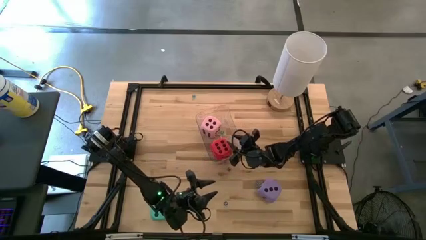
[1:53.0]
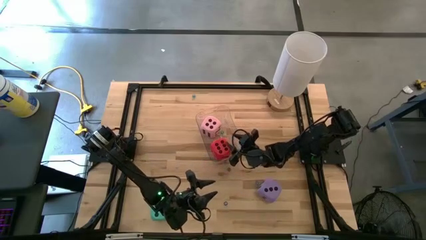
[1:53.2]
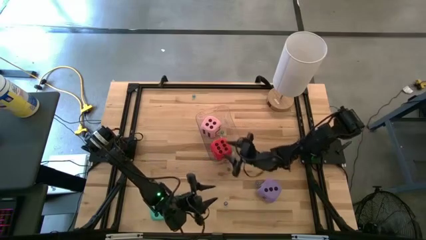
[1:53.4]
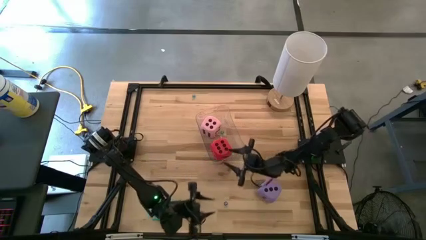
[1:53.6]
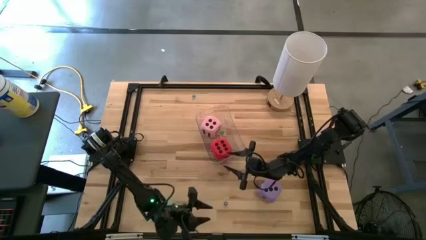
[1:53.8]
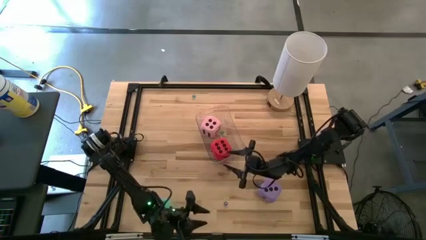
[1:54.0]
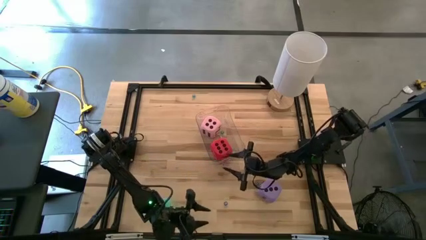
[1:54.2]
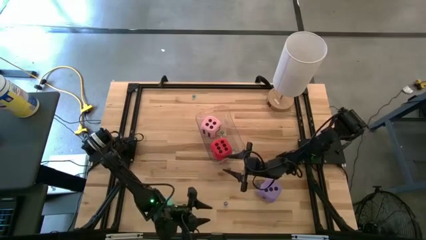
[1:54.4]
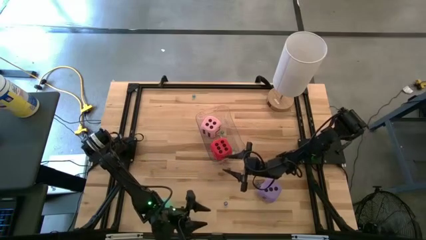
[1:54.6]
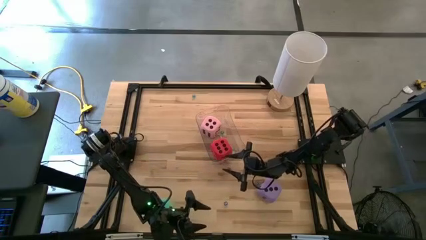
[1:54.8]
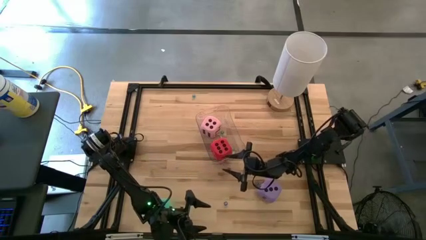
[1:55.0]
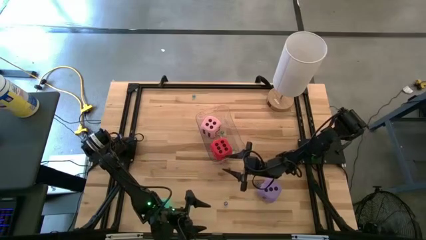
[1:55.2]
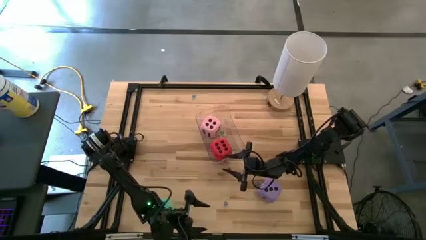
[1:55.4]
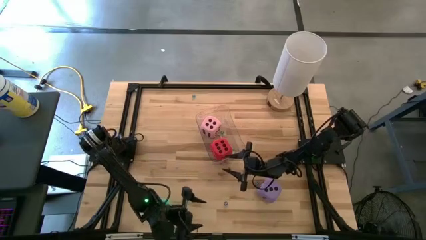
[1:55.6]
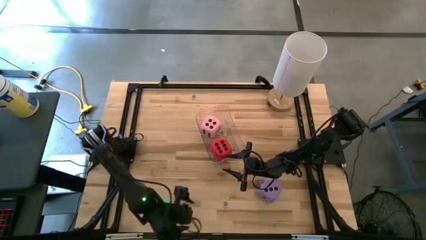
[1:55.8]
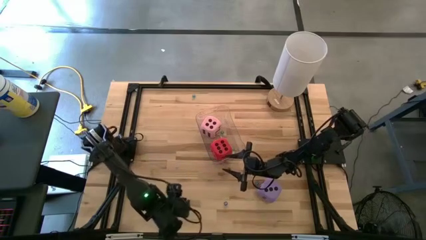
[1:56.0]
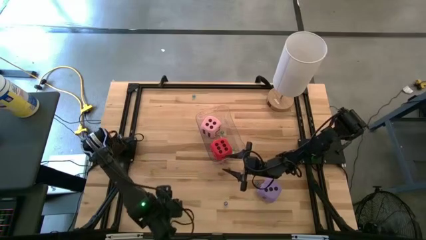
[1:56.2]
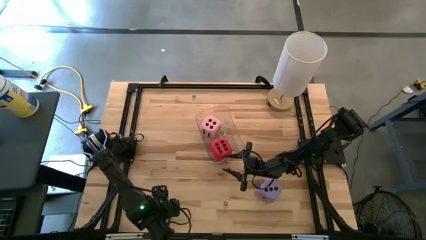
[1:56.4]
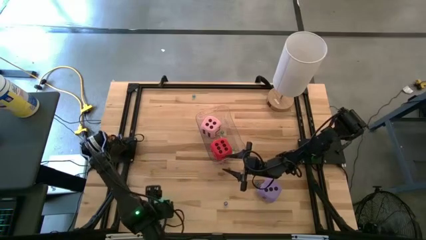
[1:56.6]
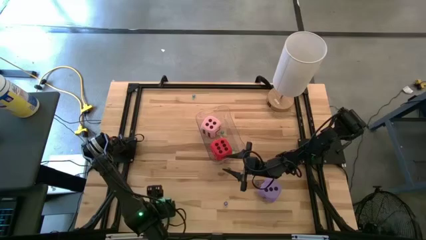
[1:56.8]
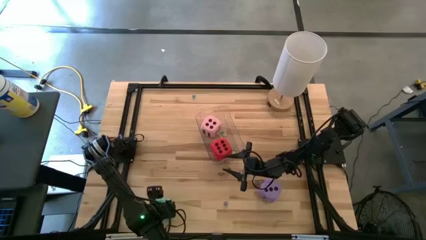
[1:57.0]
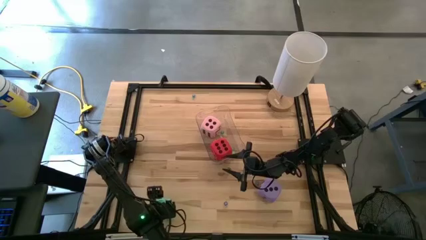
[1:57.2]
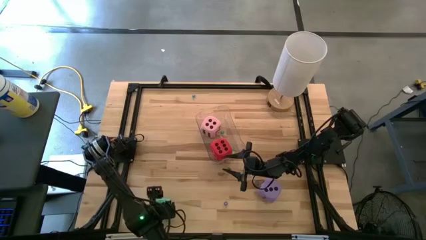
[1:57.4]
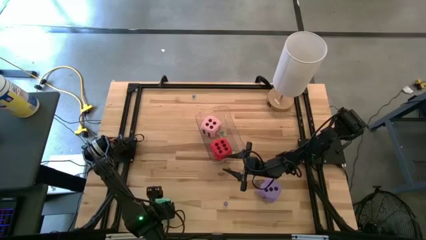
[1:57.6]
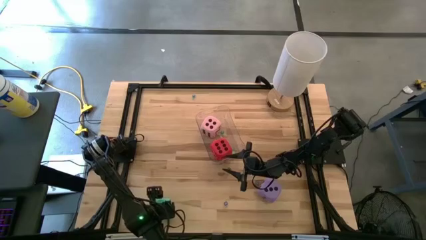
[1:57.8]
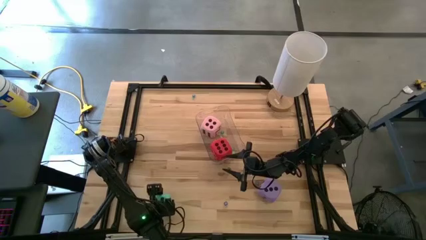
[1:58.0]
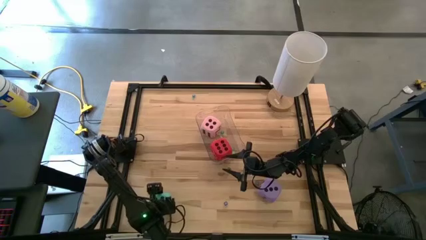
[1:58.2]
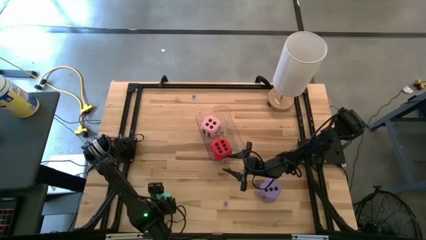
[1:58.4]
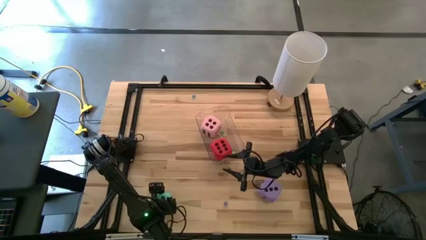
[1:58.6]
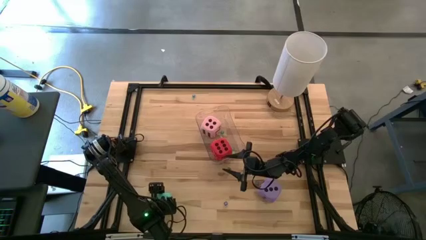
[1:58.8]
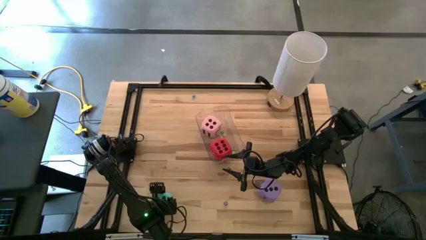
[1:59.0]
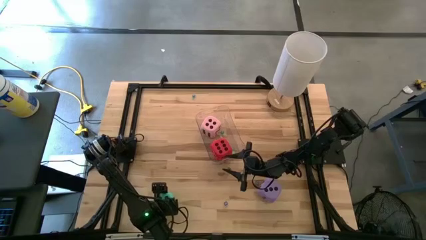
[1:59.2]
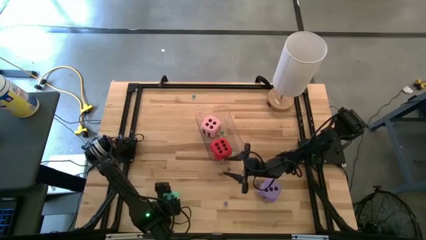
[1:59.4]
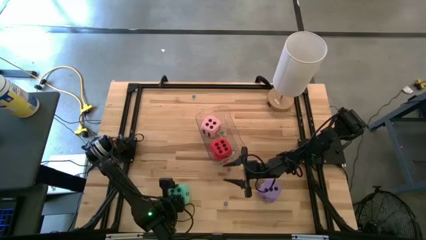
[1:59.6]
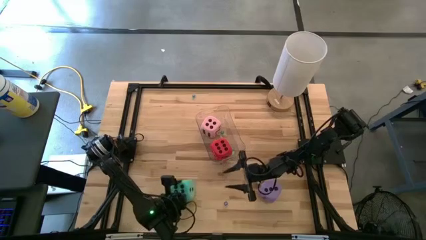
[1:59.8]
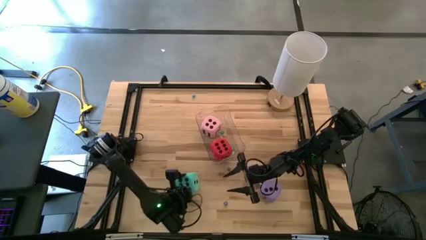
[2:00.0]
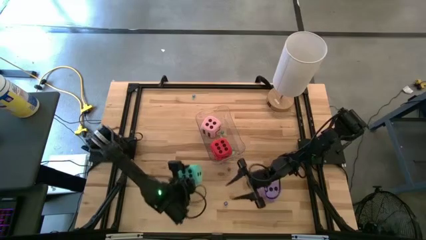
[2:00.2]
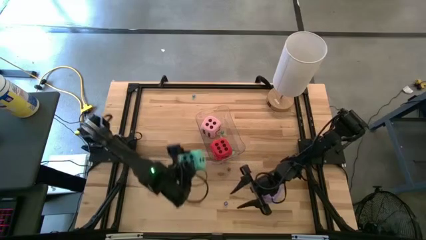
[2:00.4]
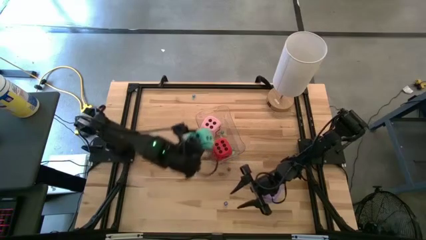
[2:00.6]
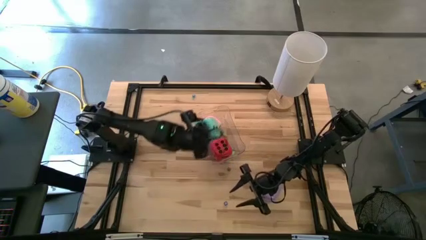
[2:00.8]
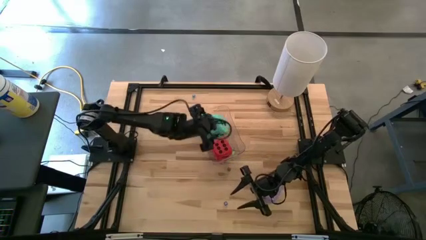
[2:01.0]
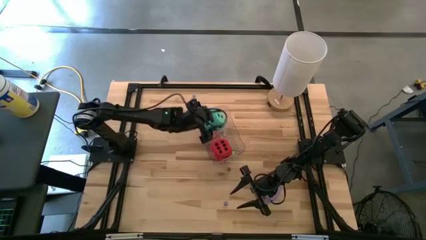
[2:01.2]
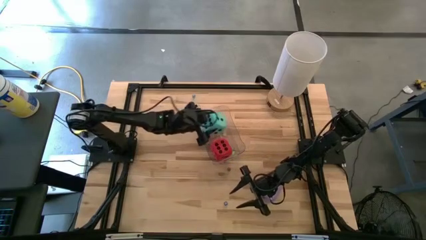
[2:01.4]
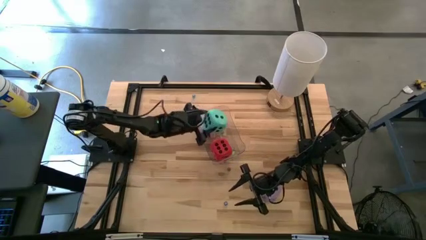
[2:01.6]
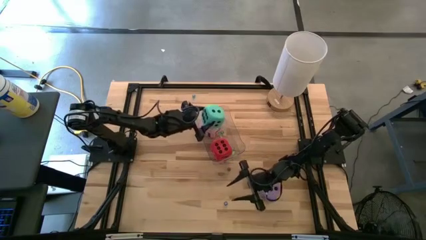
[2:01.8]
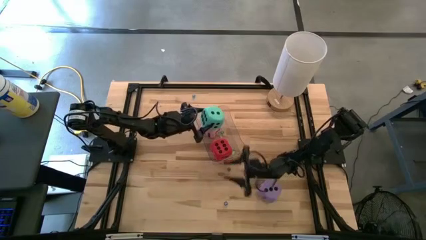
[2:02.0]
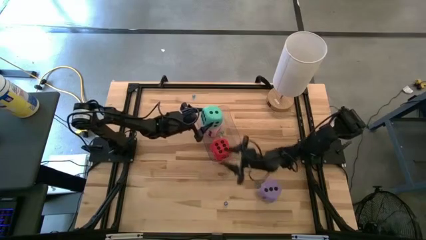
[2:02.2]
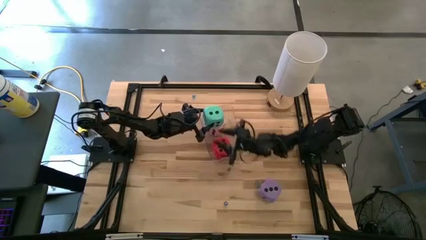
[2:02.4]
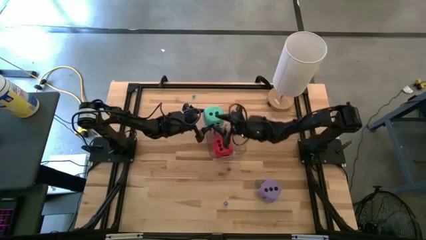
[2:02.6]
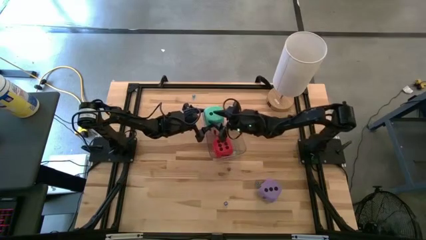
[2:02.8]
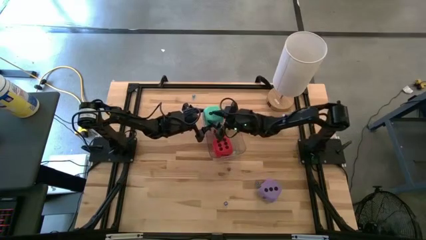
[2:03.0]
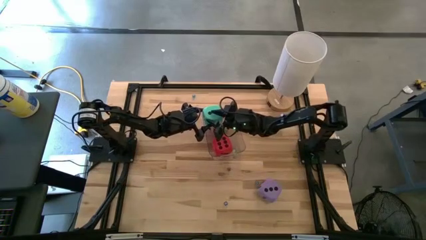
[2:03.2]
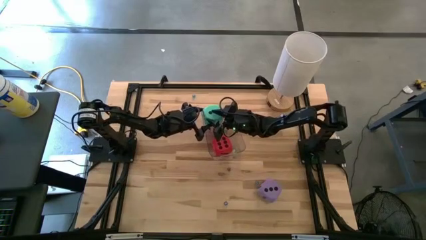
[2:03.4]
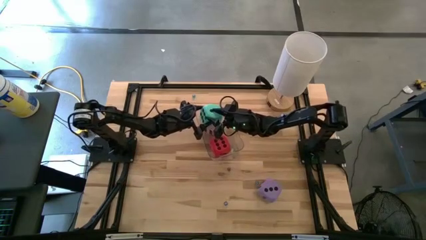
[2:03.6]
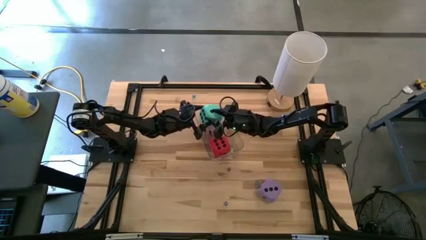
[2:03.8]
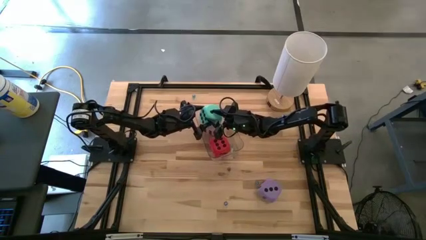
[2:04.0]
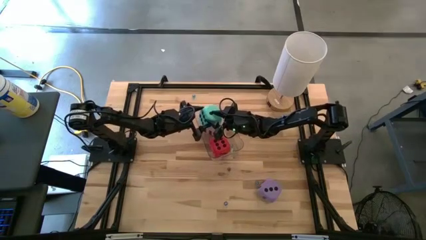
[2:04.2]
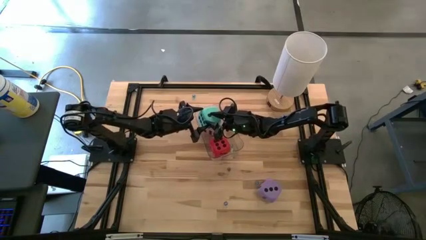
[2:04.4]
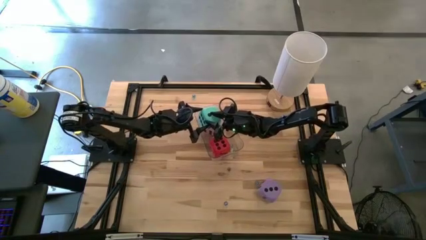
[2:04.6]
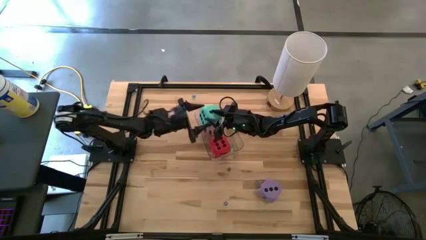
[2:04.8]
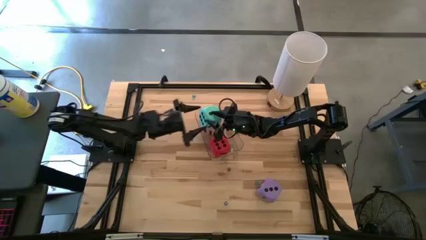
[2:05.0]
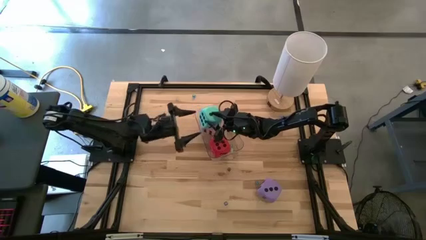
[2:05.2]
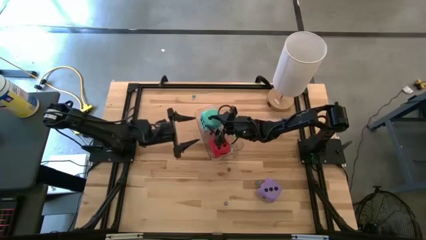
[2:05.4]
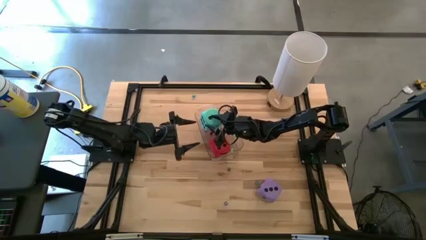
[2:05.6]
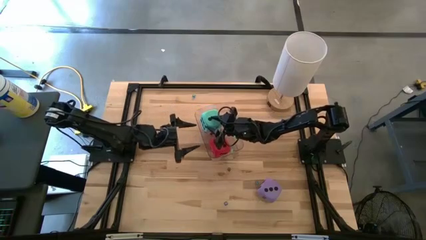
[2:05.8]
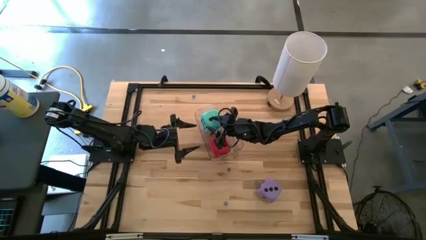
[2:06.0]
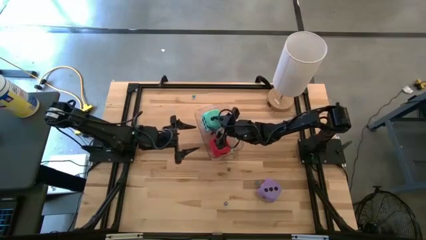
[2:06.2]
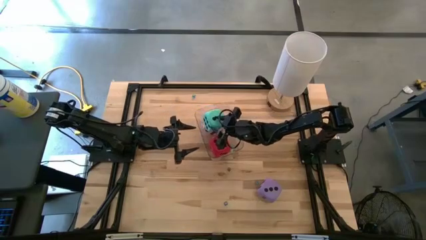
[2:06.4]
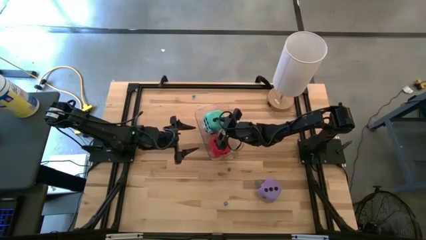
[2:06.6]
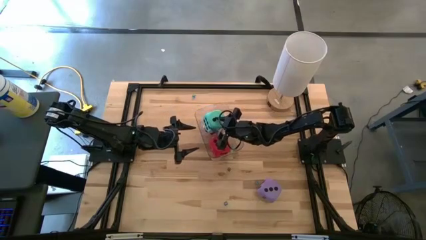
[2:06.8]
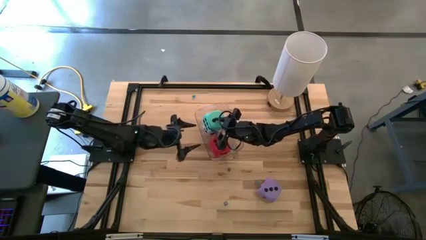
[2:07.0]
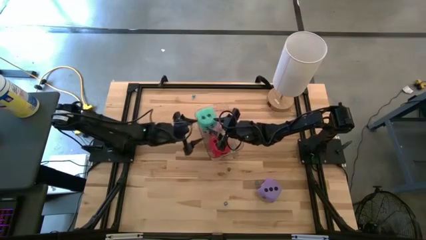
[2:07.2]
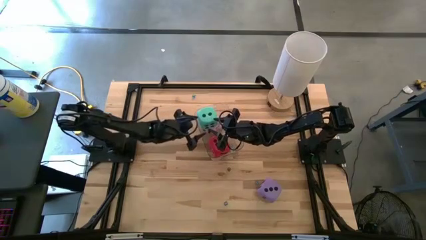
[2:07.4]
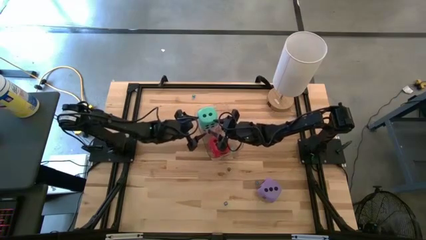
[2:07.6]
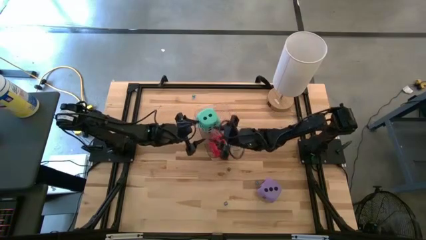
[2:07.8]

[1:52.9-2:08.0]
Task: Pick & Place Dice
Put the large blue dice into the transparent bin

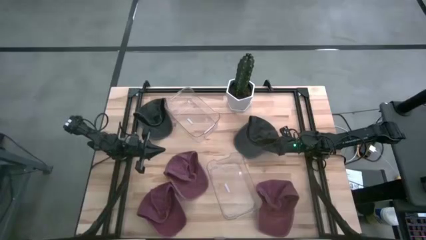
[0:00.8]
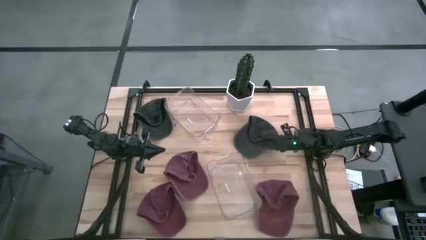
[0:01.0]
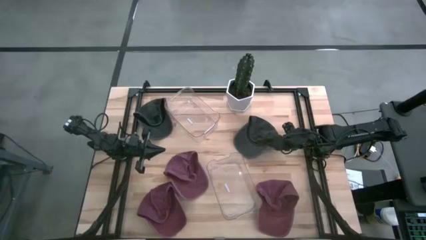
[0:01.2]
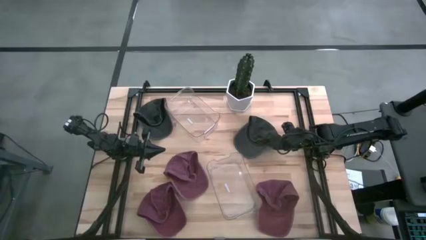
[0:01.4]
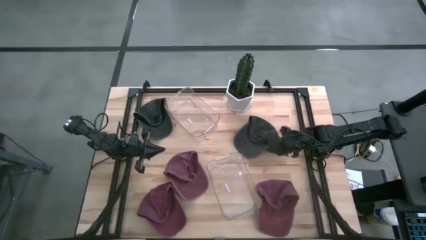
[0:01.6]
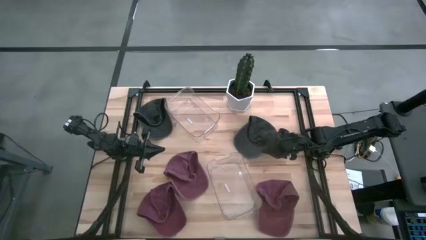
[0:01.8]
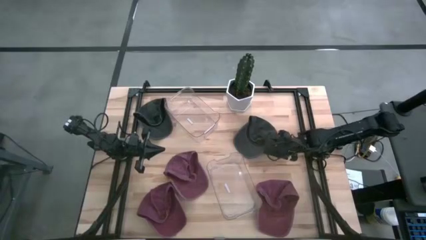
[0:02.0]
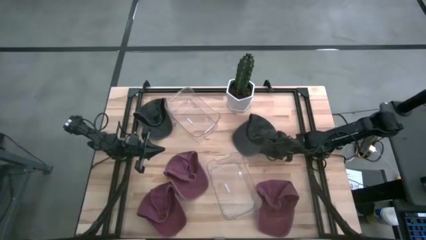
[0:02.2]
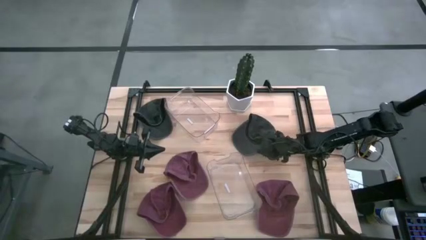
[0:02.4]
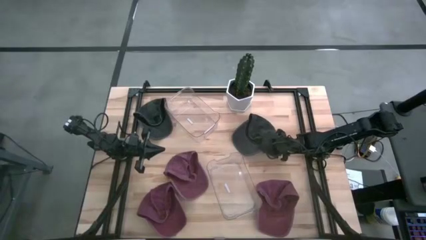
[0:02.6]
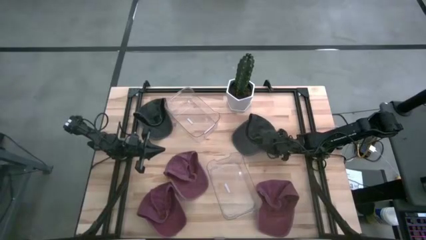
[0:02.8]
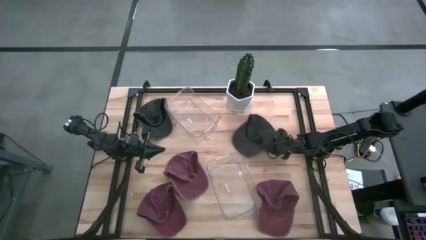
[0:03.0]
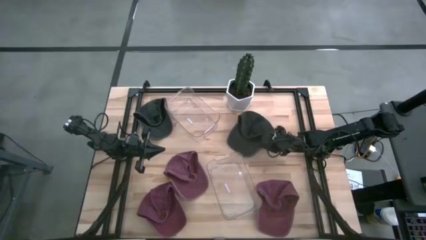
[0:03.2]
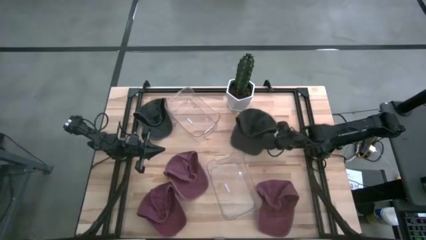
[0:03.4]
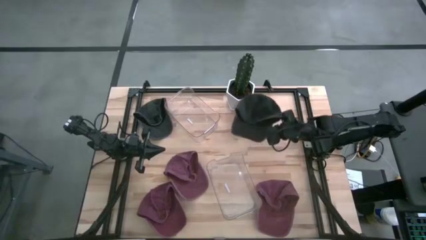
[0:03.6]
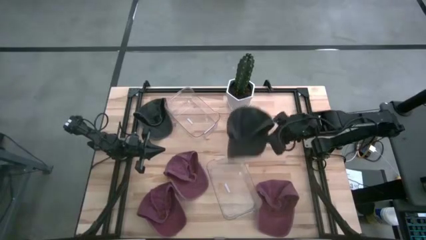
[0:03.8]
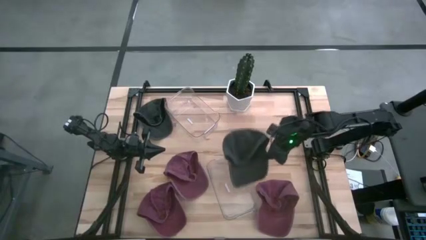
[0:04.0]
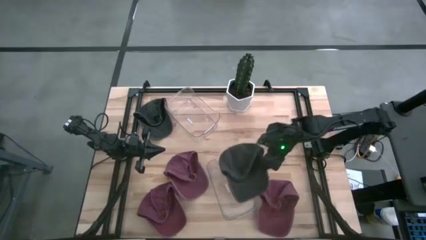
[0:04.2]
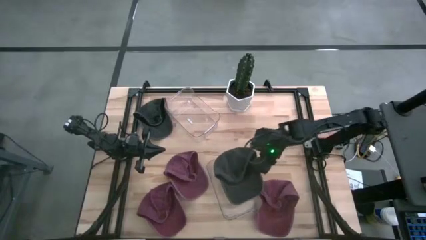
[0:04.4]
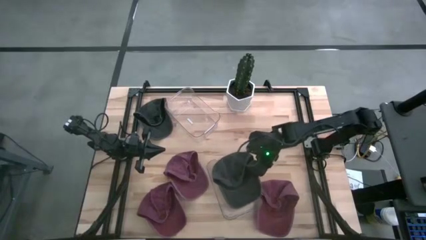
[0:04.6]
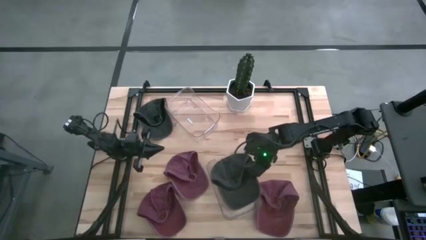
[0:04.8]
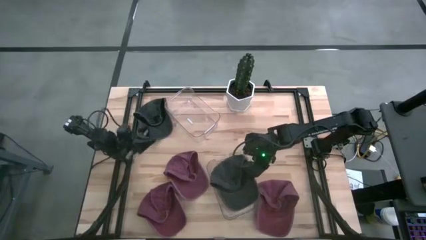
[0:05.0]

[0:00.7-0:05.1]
Task: Pick & Place hat
Put the right black cap into the bottom transparent bin
